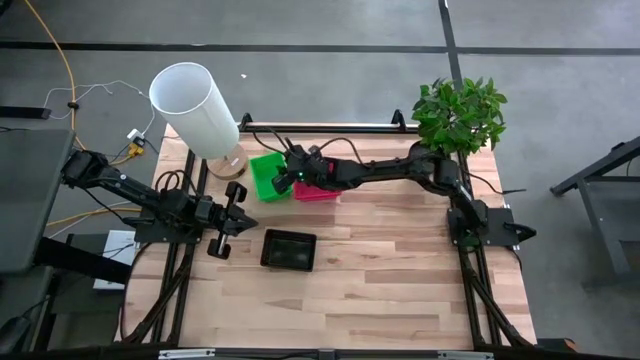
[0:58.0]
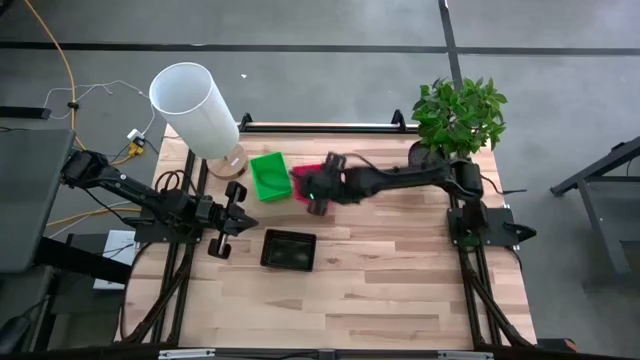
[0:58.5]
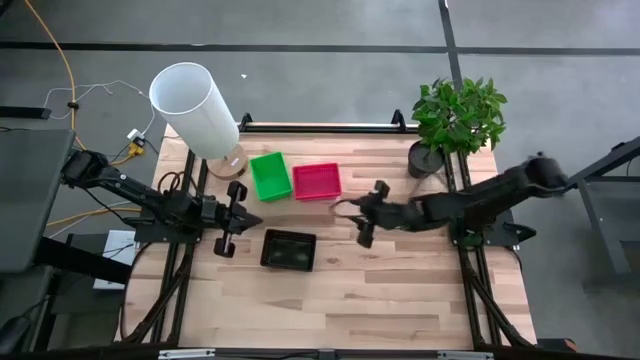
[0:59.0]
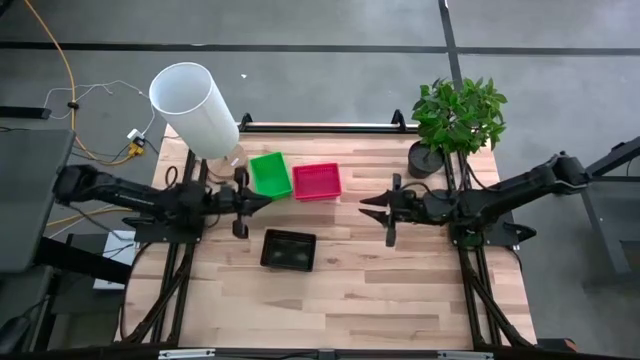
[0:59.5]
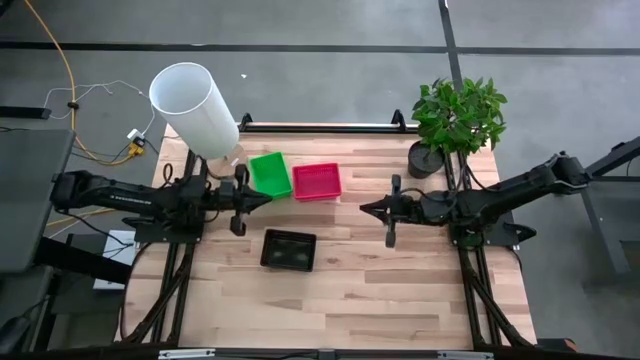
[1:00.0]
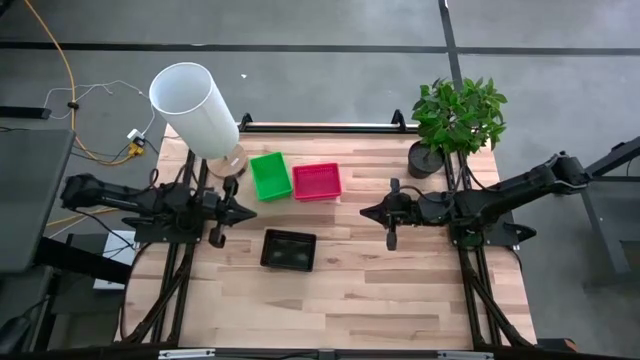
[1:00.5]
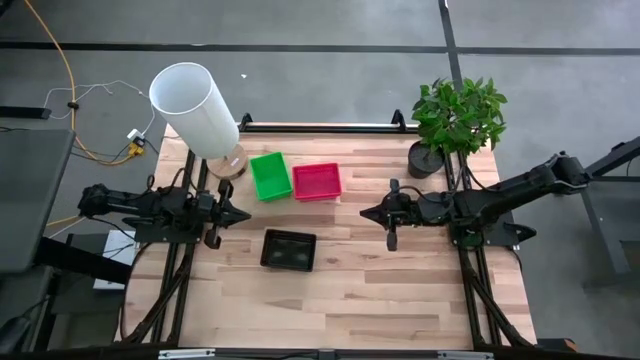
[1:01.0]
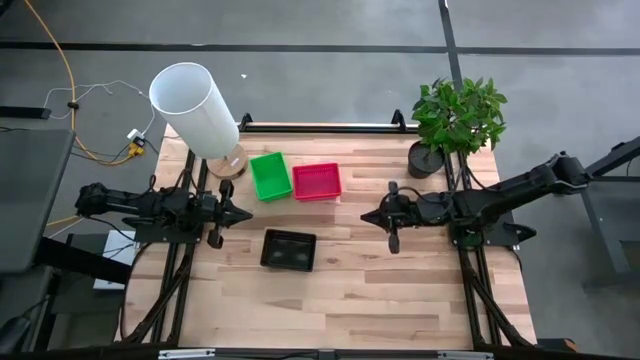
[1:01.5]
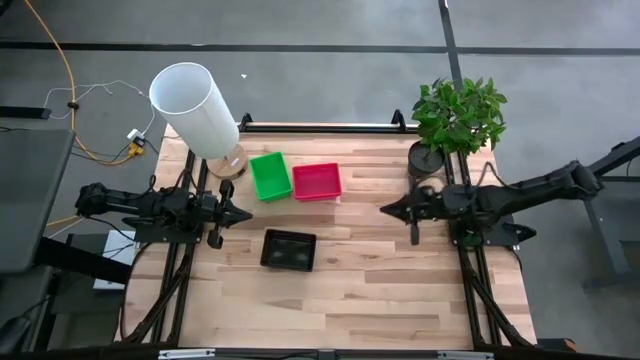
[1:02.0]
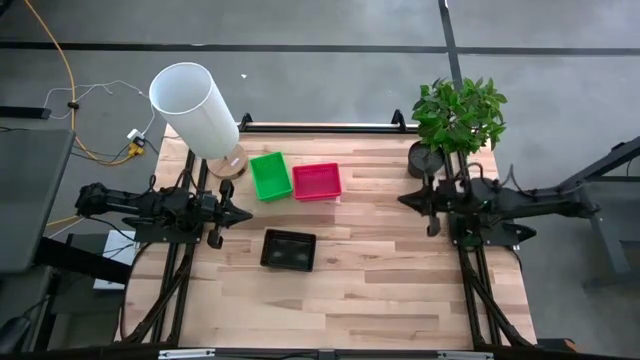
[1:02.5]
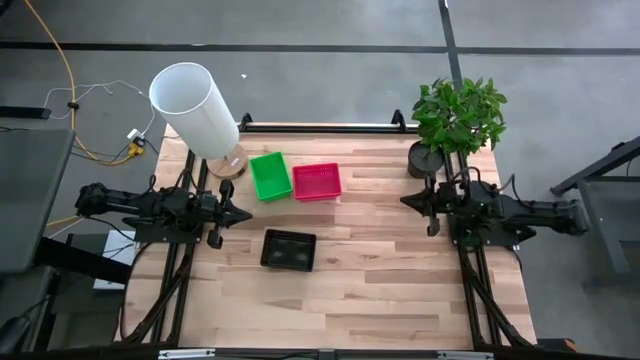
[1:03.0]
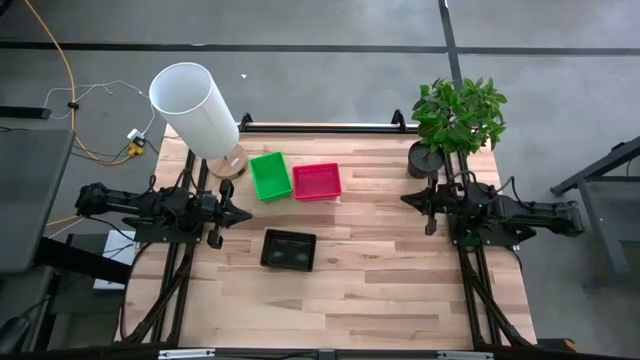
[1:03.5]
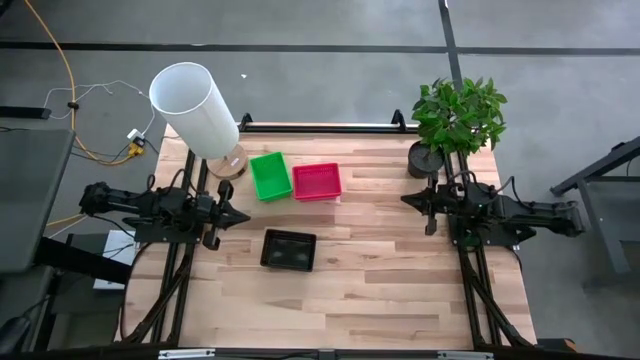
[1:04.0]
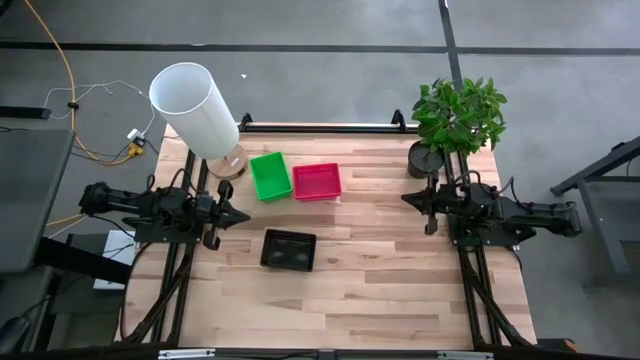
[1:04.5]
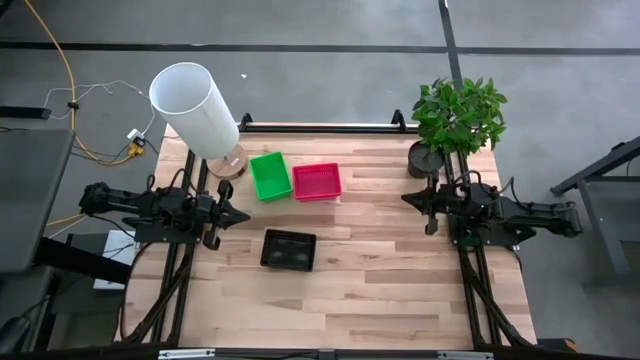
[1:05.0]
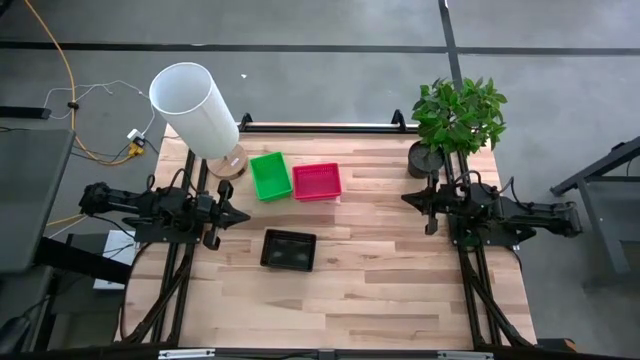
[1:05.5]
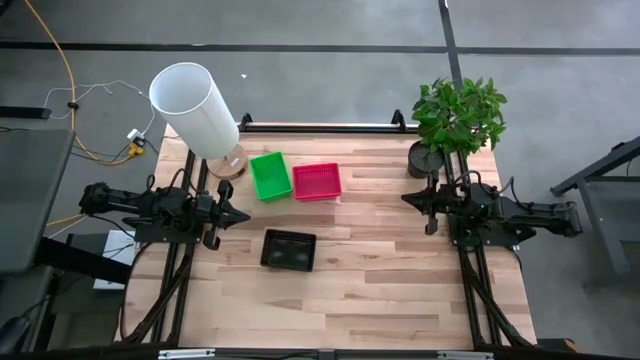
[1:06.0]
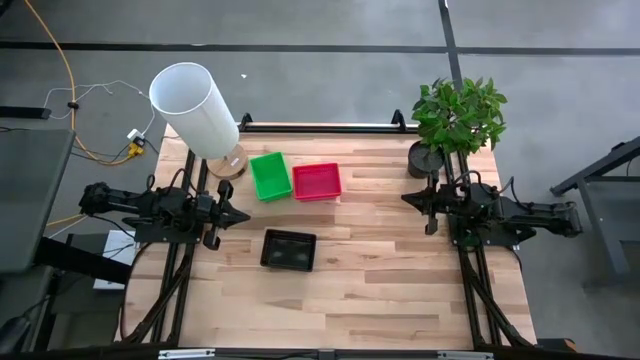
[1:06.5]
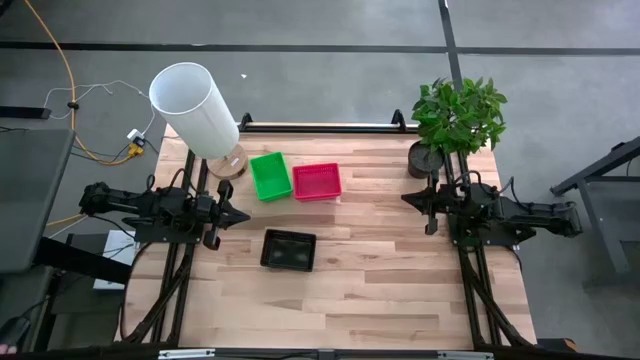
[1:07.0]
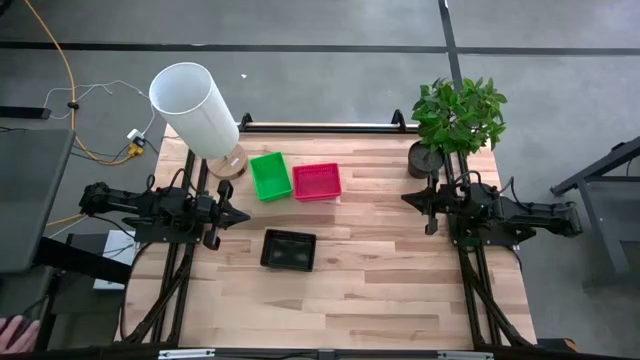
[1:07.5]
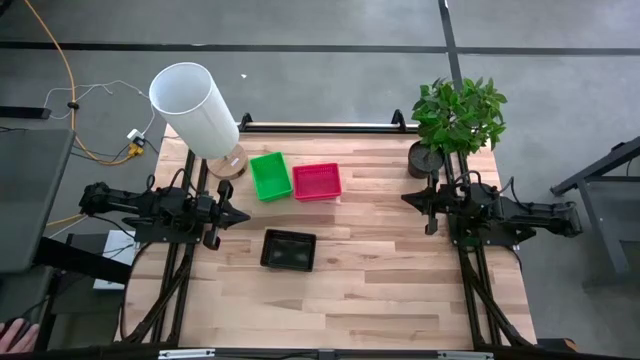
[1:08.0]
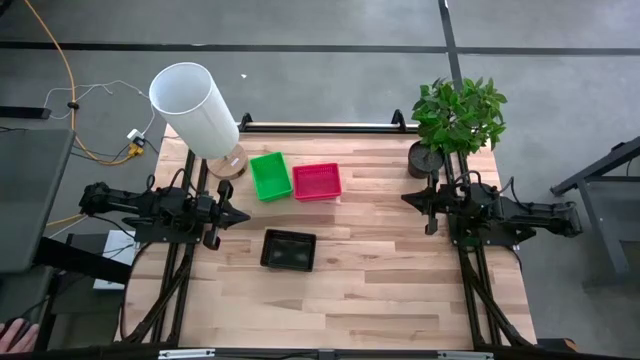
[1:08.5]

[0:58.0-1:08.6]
Return to Home Position

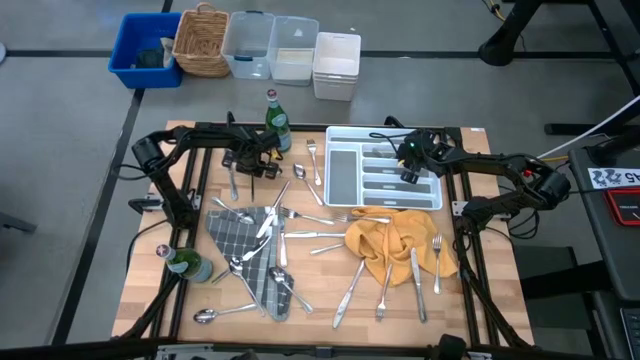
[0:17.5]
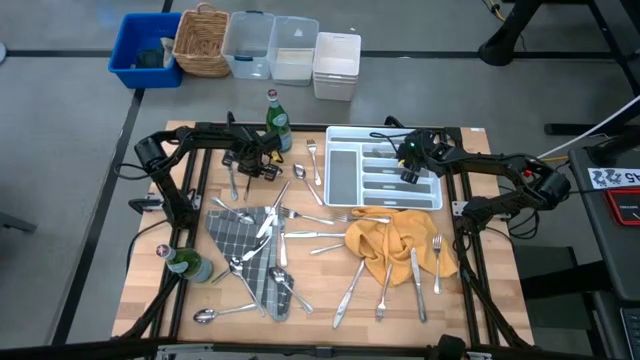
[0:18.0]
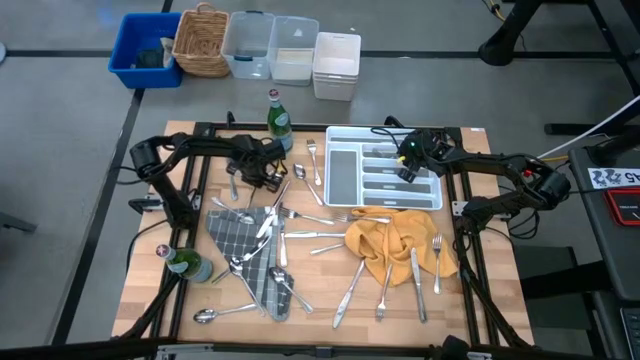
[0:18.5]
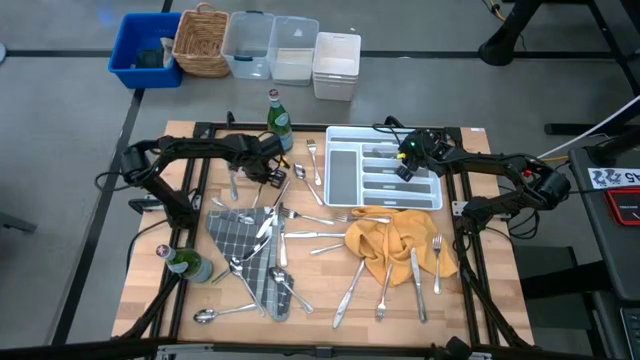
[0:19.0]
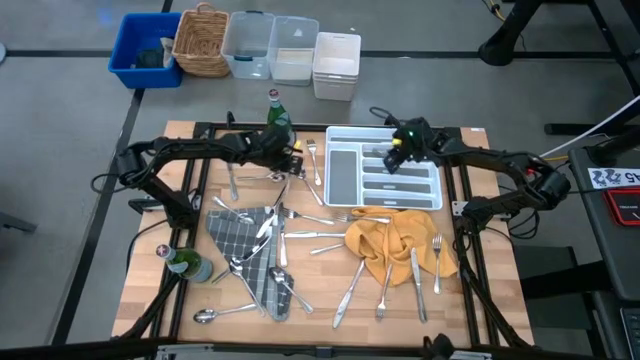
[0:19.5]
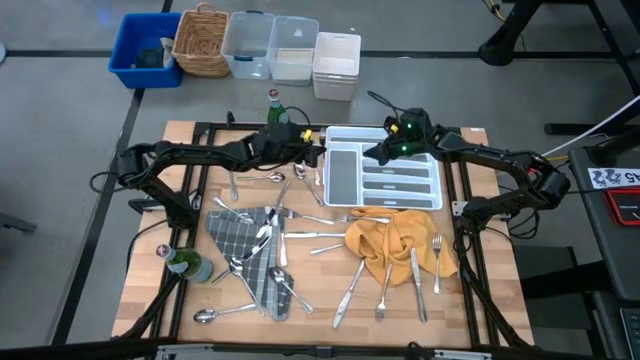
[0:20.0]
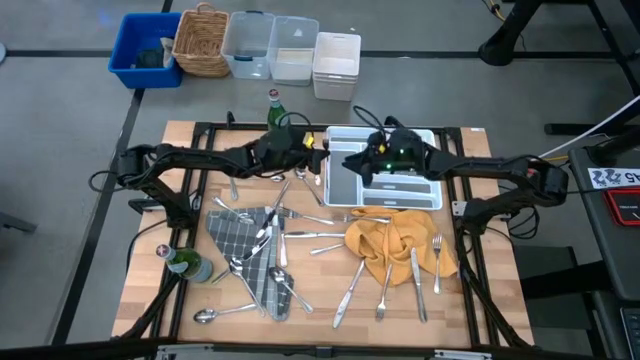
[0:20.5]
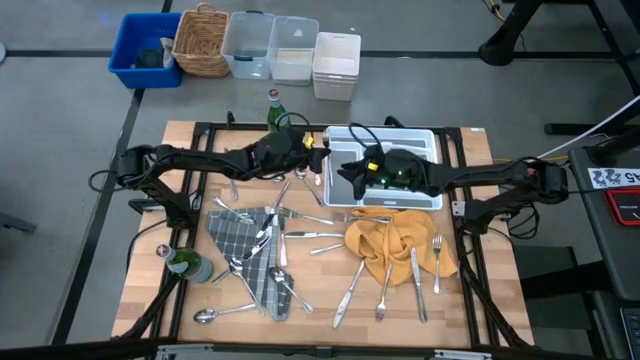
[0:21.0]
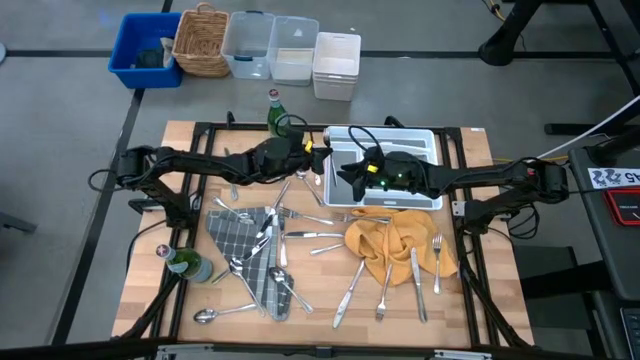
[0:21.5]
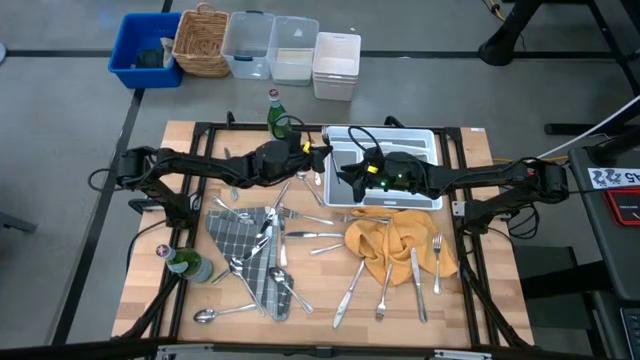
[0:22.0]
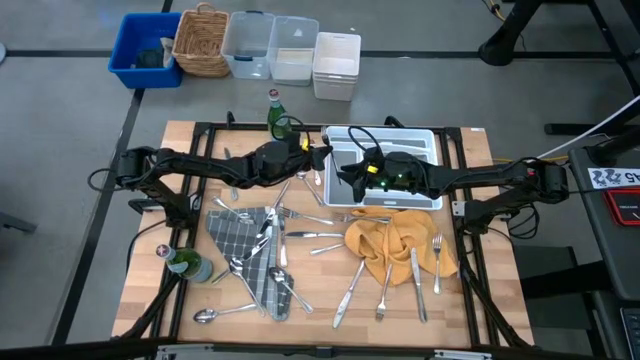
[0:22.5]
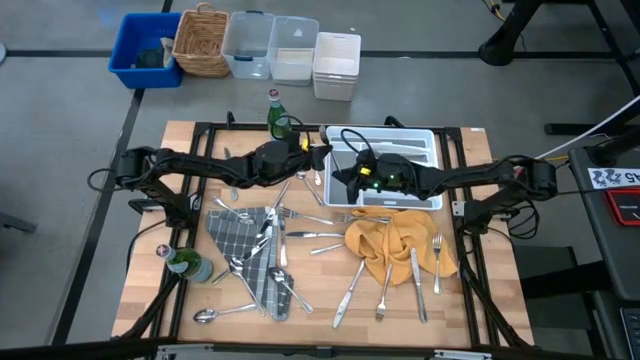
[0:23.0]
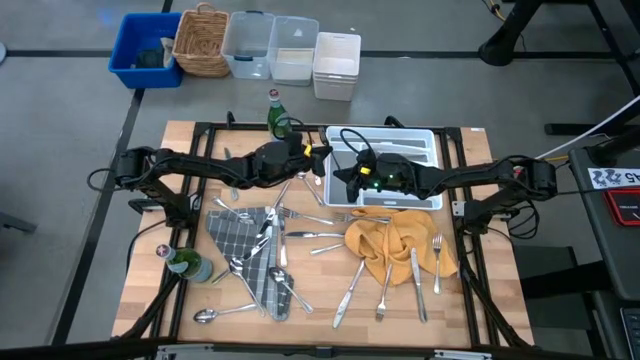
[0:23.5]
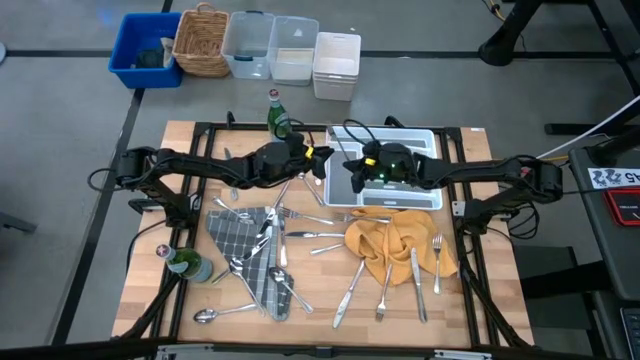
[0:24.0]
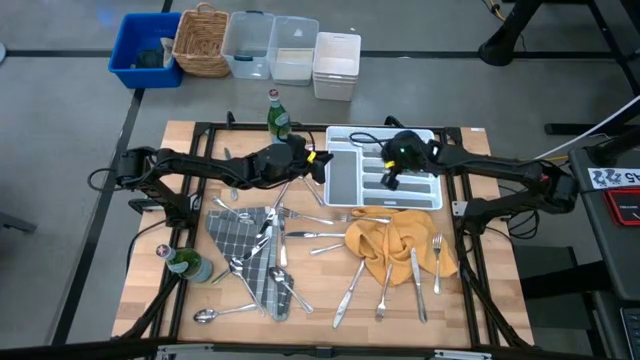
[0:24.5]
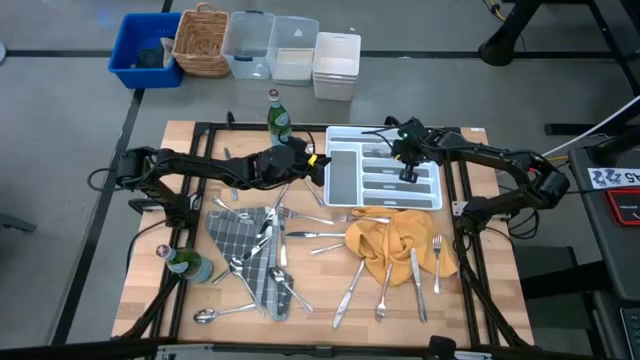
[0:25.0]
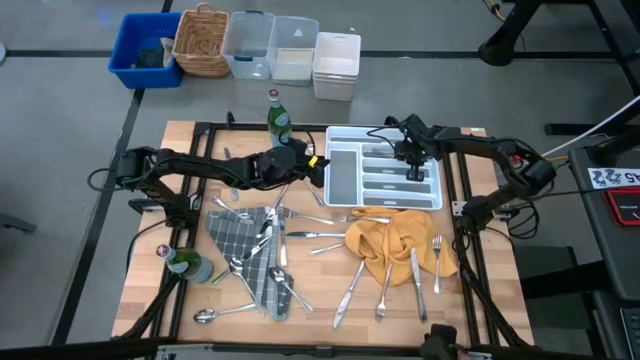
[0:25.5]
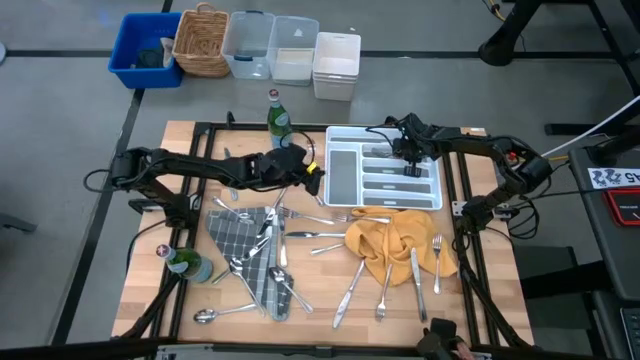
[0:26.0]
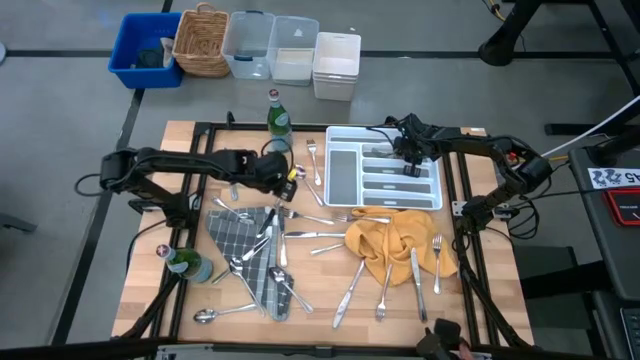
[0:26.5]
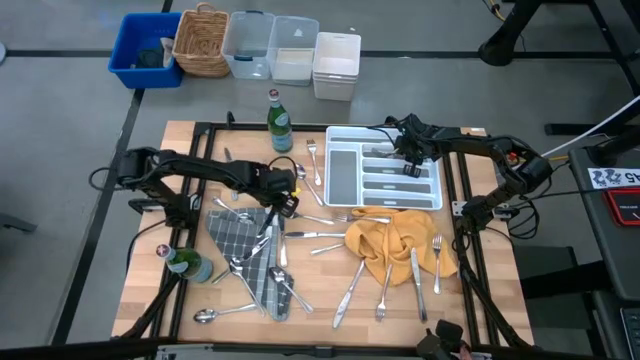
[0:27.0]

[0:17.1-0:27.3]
Put the silver fork into the cutlery tray
